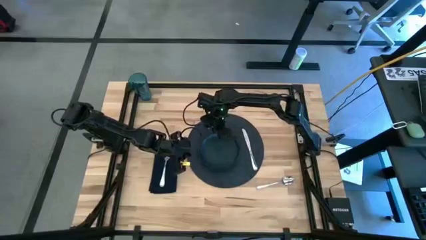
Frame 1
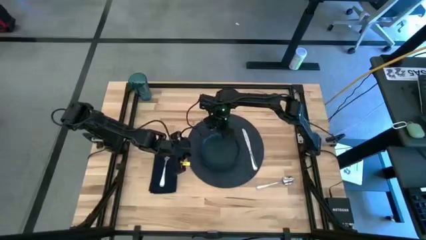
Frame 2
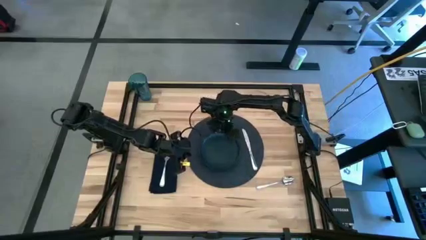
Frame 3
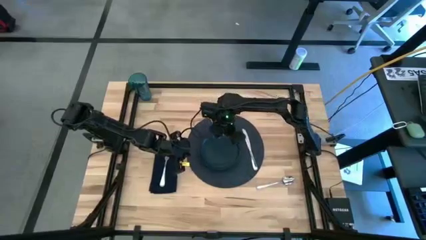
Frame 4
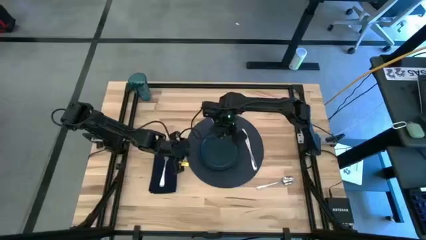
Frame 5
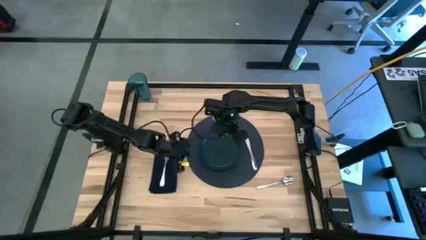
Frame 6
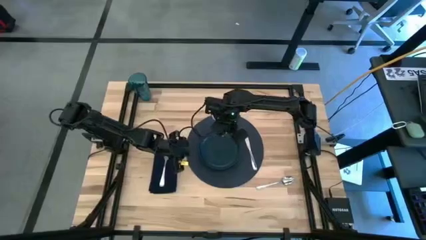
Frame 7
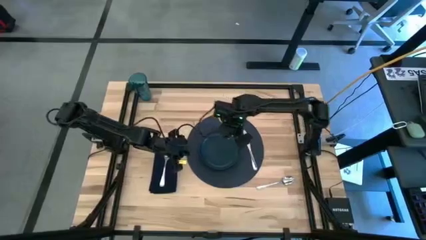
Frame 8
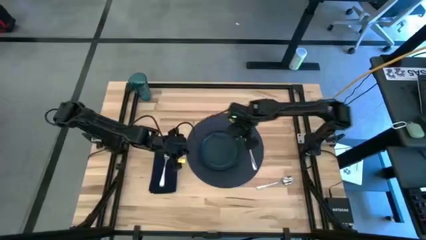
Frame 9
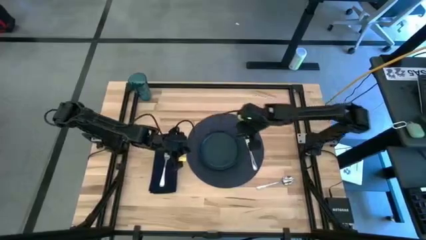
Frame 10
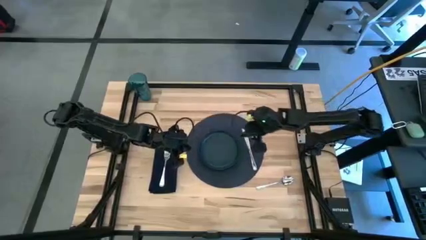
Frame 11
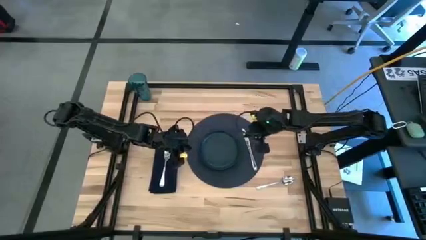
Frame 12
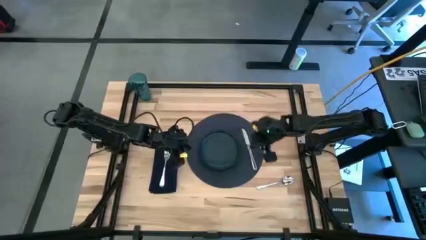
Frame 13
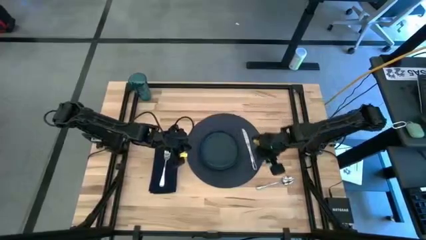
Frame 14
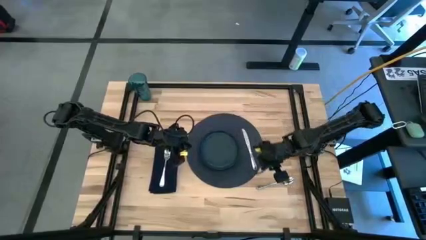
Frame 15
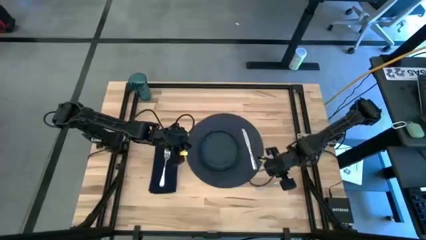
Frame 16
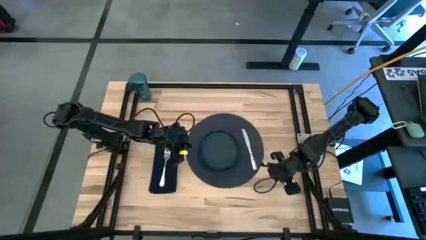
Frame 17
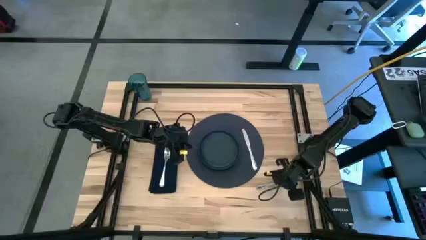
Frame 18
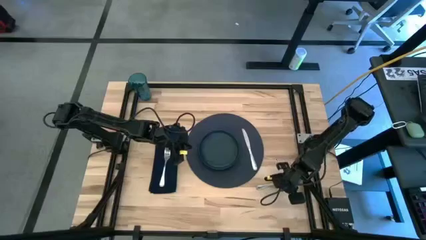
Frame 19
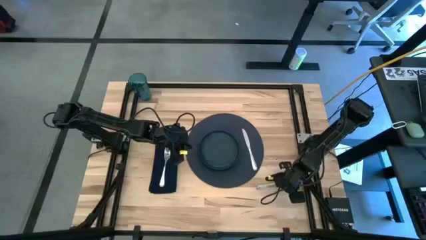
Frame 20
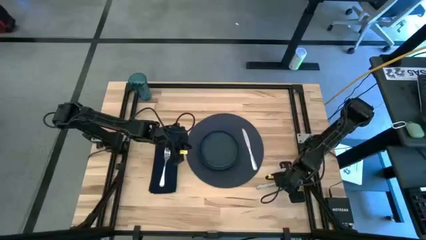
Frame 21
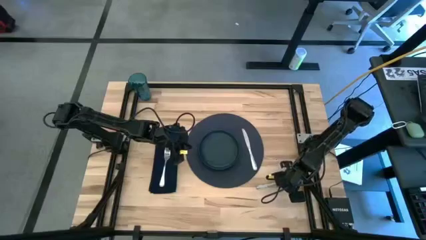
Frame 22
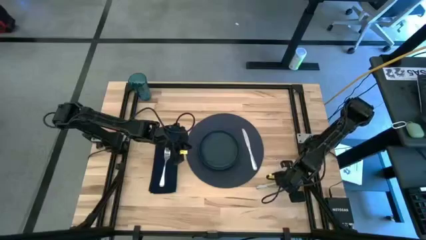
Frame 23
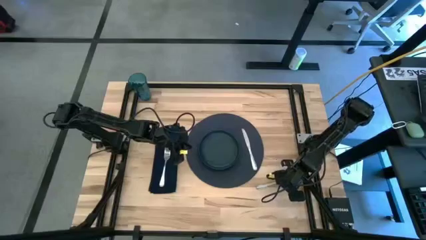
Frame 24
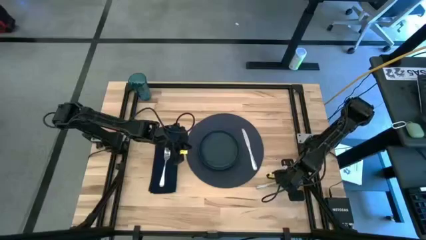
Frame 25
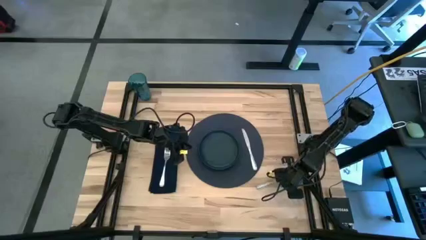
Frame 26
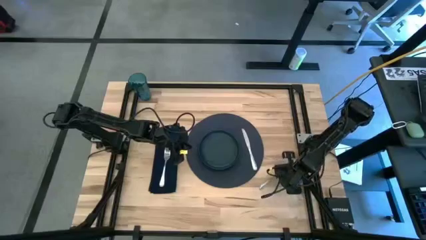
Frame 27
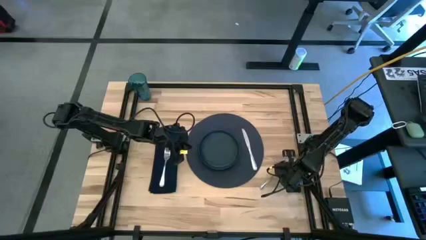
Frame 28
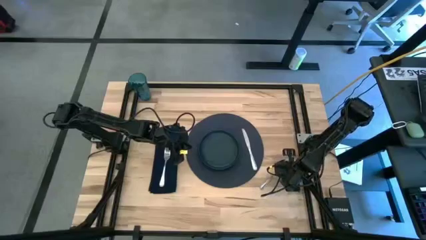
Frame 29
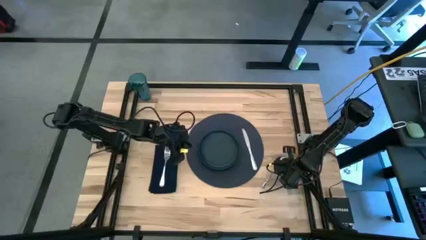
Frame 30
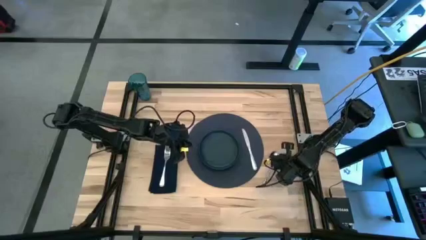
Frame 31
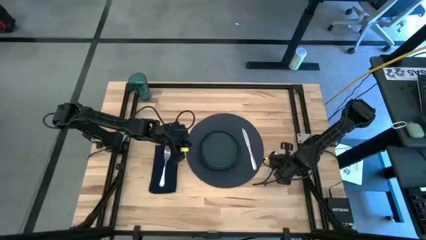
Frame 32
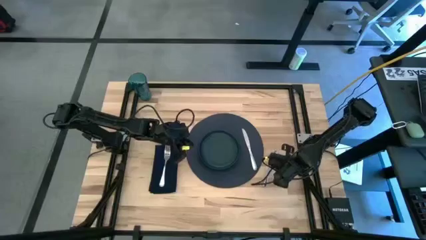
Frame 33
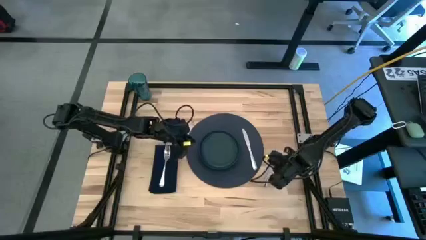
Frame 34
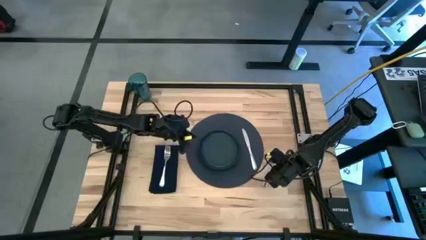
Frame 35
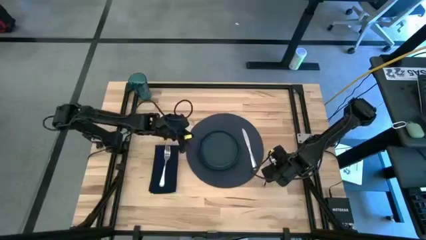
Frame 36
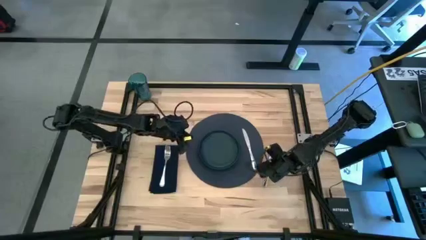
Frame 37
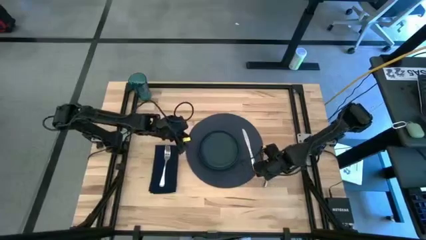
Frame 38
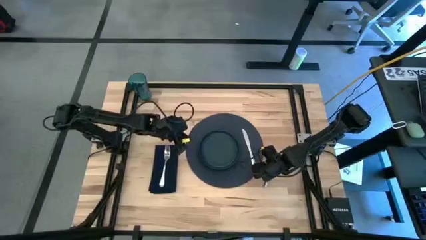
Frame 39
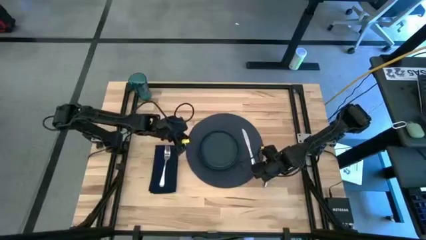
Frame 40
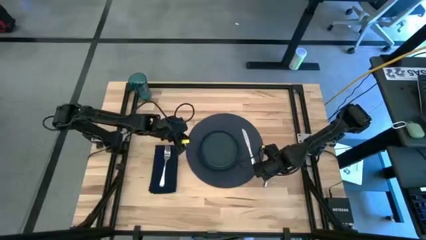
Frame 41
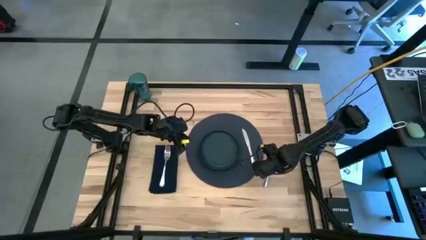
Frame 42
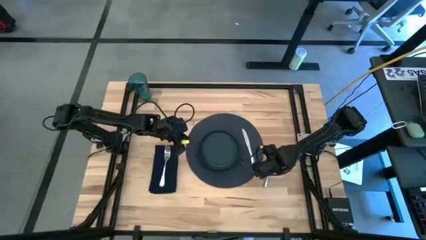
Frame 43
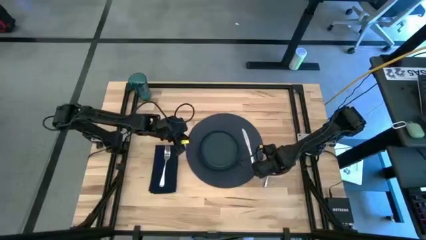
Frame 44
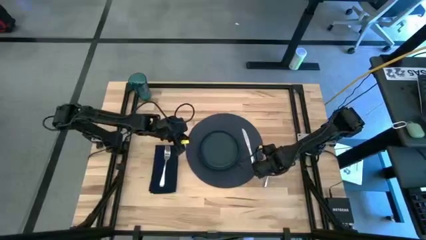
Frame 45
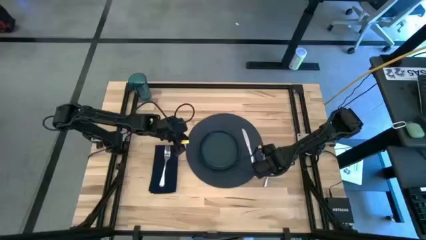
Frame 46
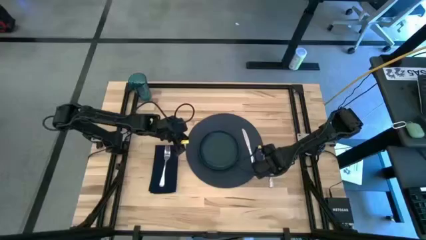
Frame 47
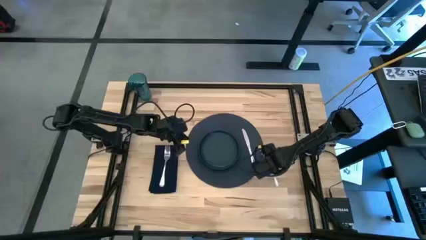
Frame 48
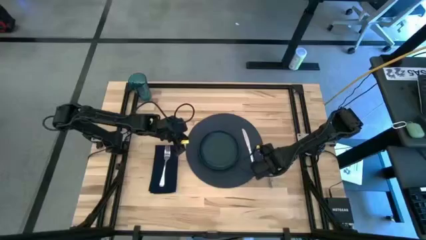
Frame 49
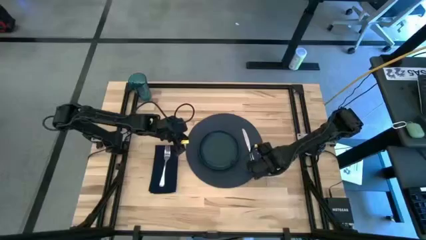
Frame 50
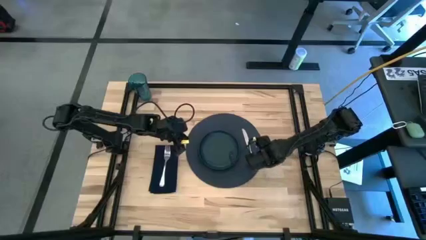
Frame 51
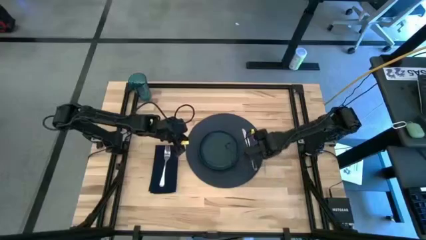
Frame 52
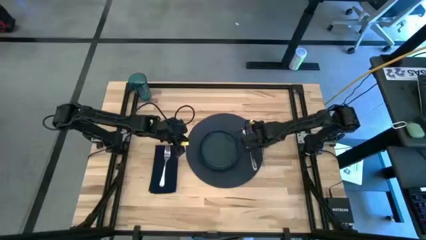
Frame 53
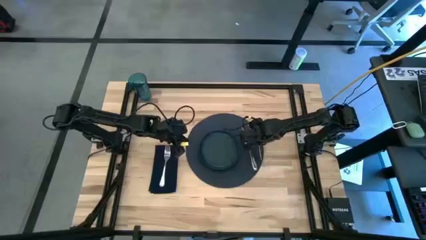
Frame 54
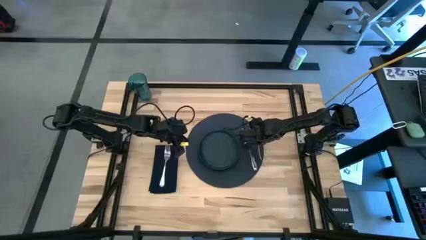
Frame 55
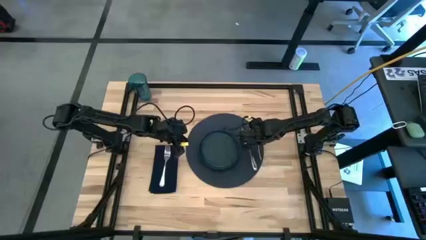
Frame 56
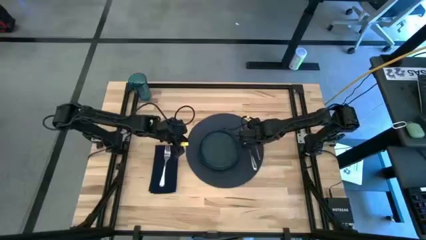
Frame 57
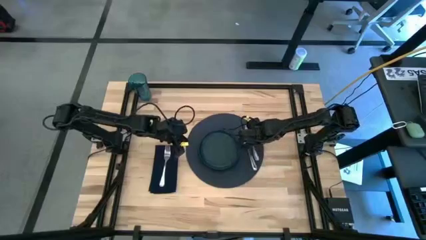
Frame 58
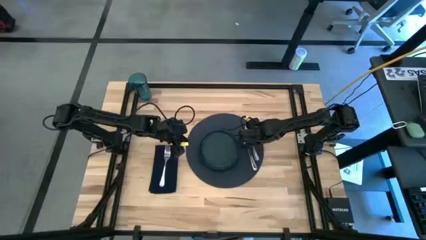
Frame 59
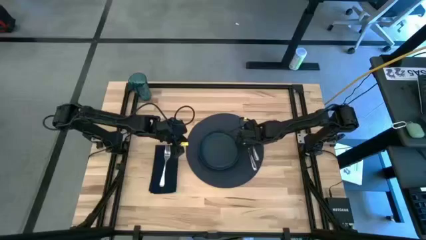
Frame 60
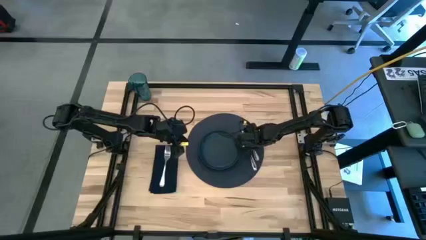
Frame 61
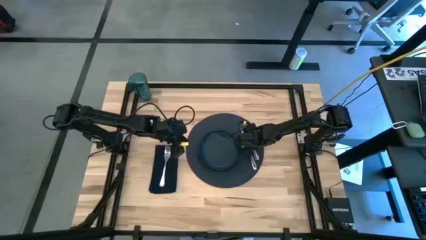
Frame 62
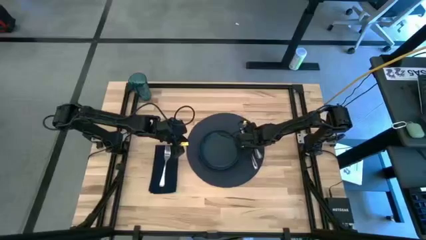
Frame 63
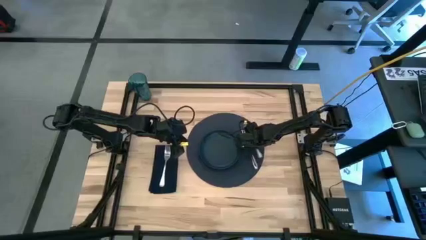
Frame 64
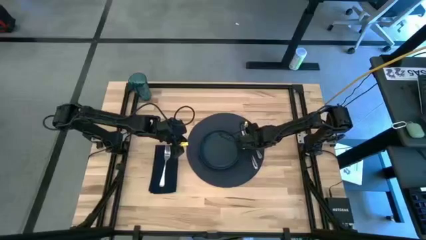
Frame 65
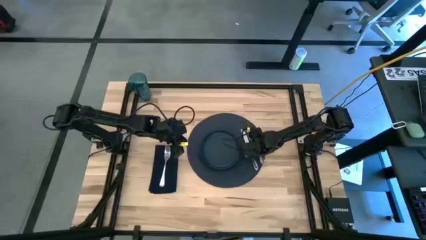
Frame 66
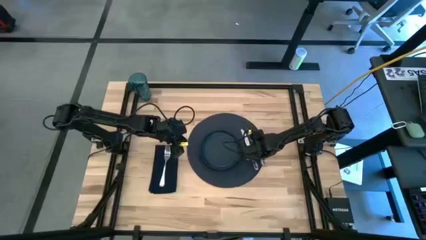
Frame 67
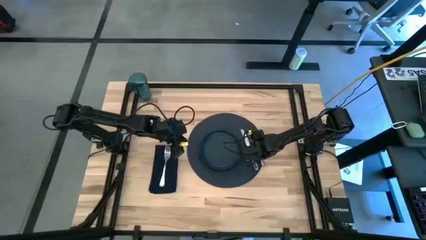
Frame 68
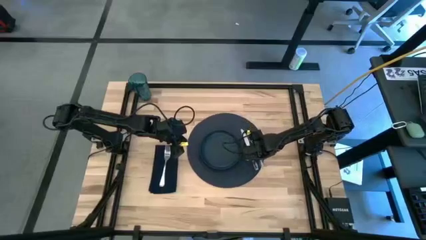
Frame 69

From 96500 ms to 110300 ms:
Task: Set table place
Put the silver spoon to the right of the silver table knife on the black tablemat

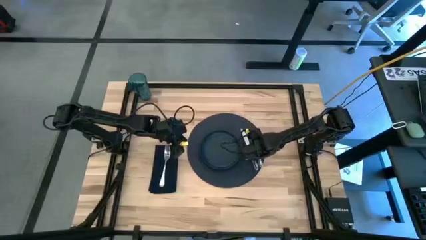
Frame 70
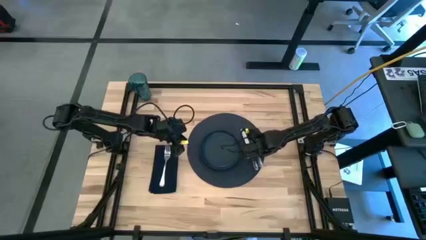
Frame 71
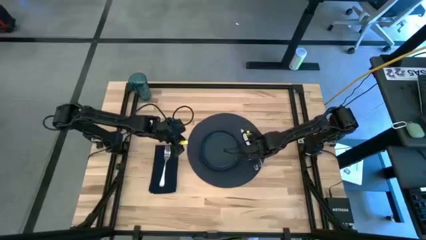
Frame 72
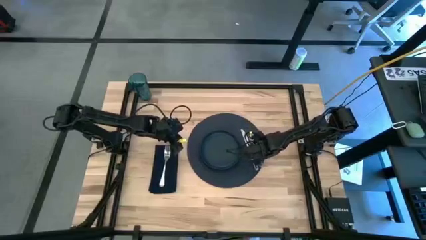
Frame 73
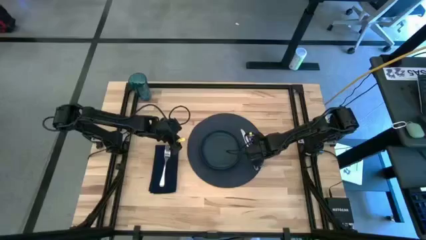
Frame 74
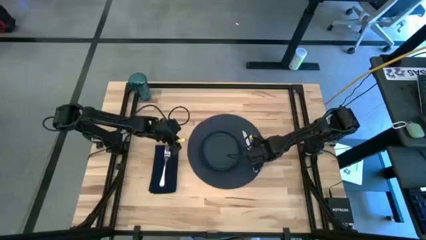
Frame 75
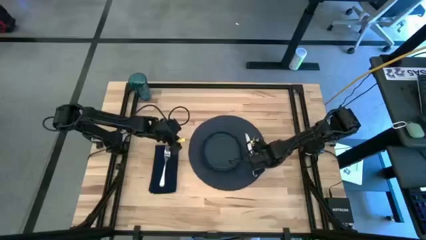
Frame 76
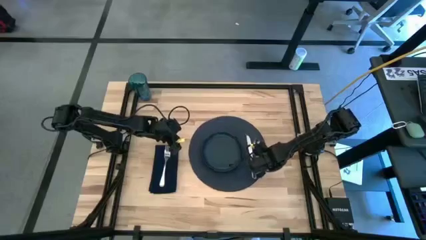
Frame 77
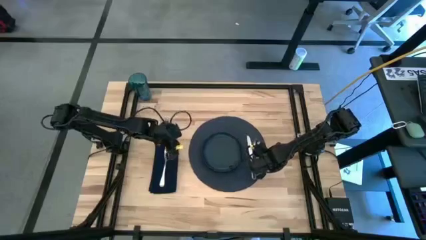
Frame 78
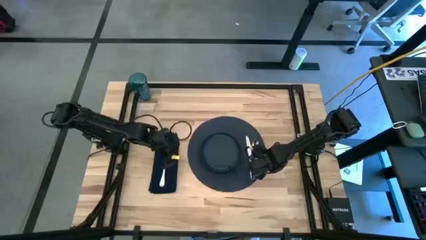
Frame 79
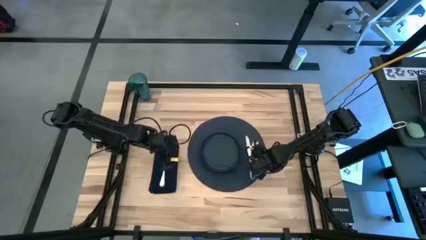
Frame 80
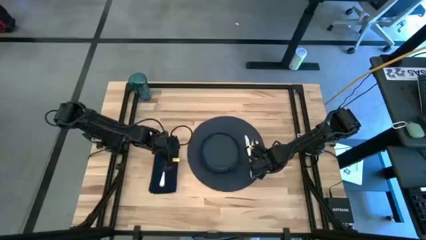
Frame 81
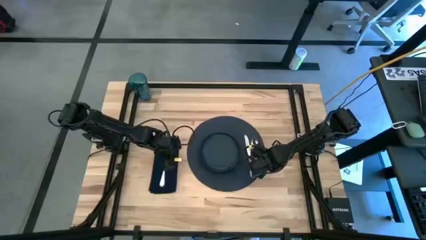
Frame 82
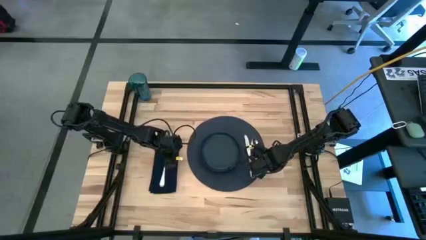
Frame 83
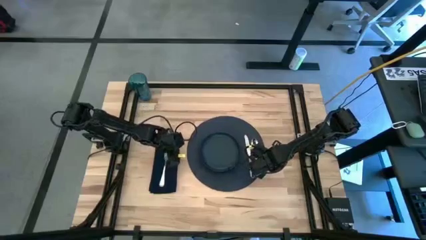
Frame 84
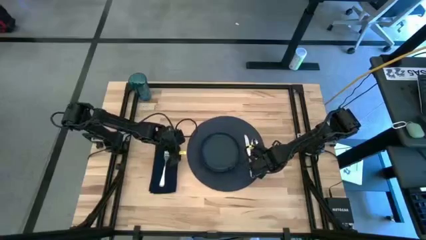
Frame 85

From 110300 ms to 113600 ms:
Adjust the black tablemat
